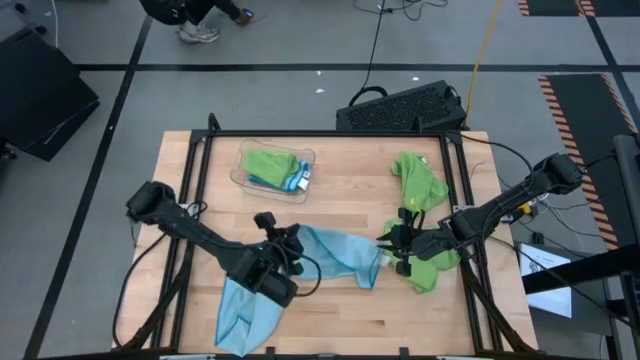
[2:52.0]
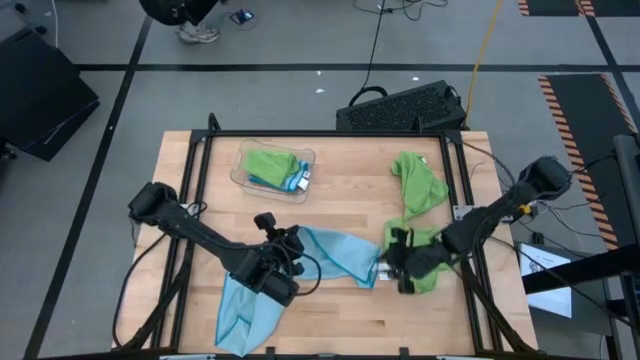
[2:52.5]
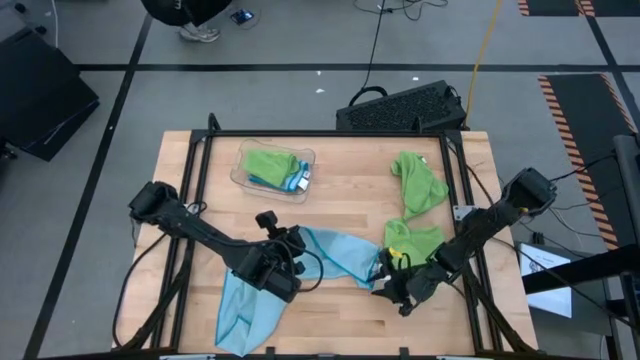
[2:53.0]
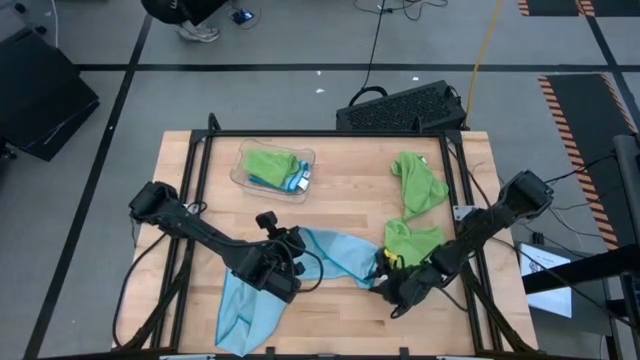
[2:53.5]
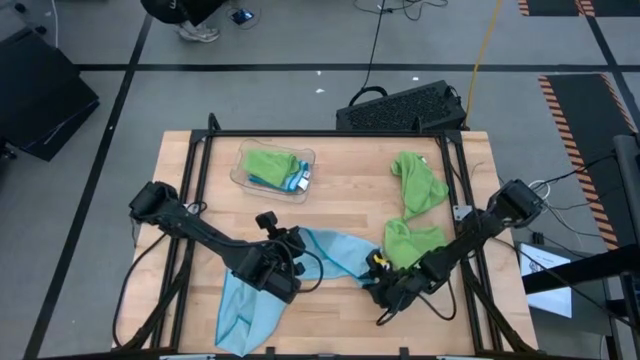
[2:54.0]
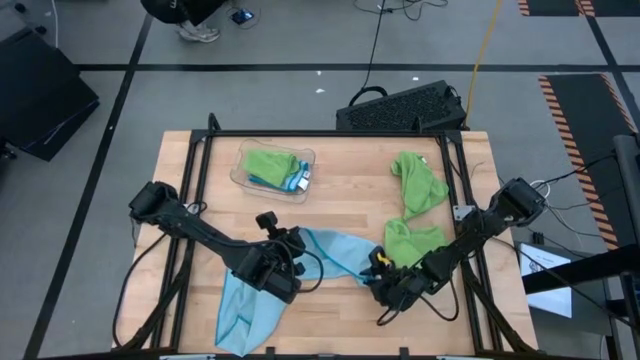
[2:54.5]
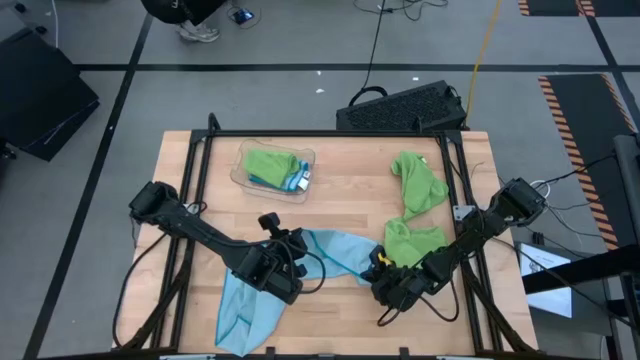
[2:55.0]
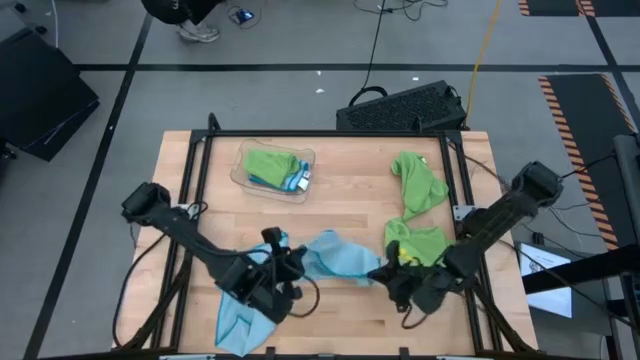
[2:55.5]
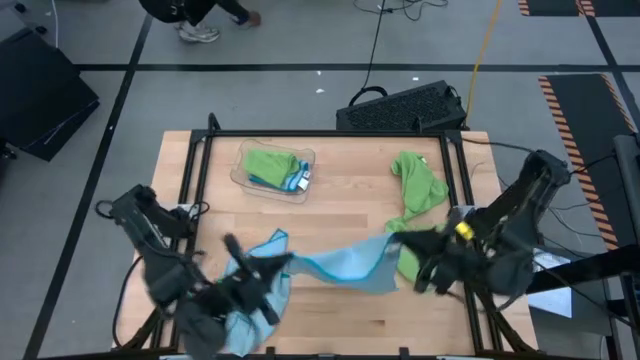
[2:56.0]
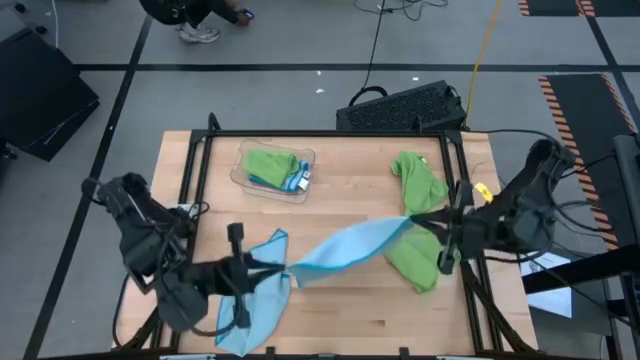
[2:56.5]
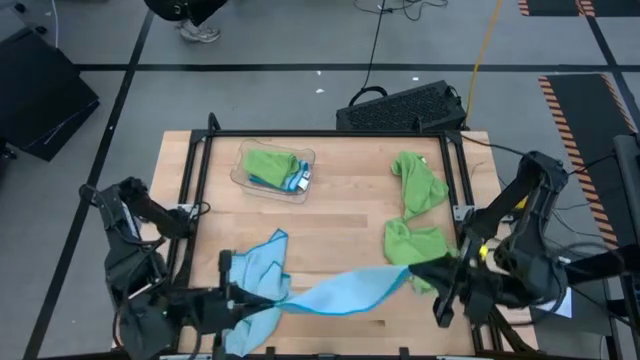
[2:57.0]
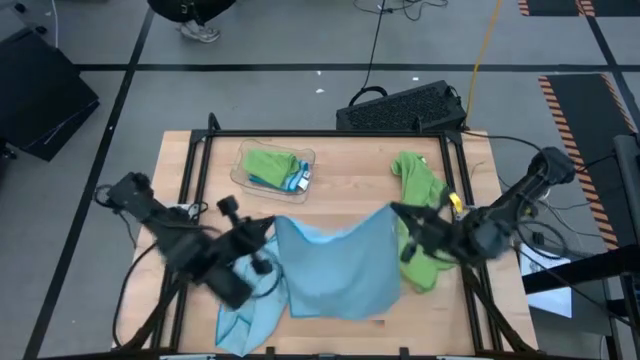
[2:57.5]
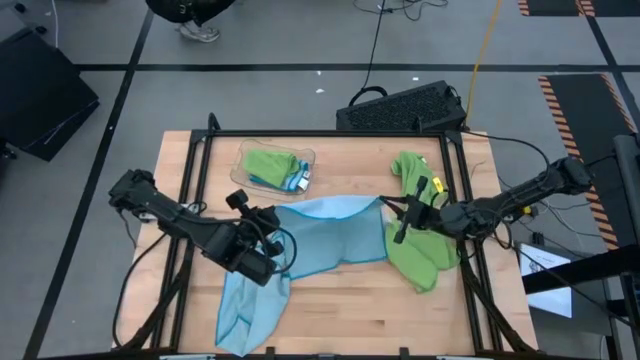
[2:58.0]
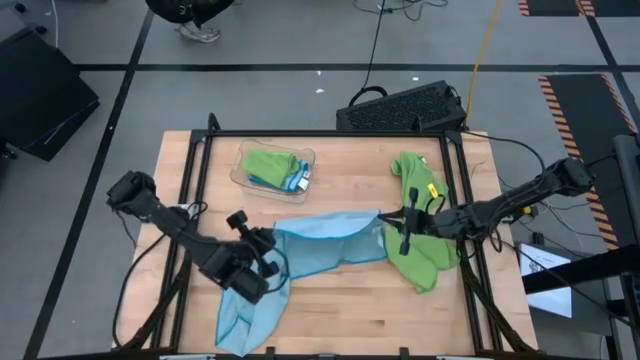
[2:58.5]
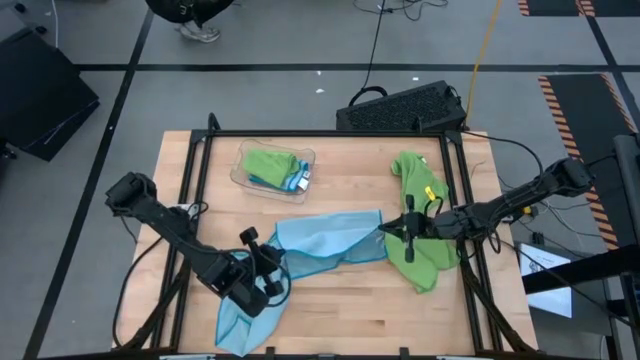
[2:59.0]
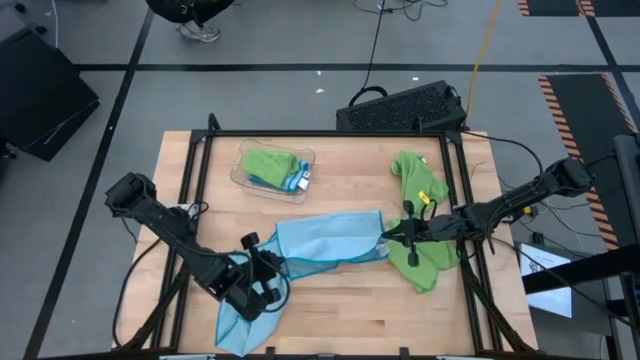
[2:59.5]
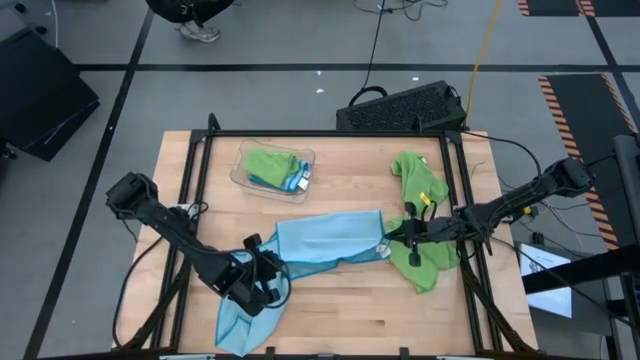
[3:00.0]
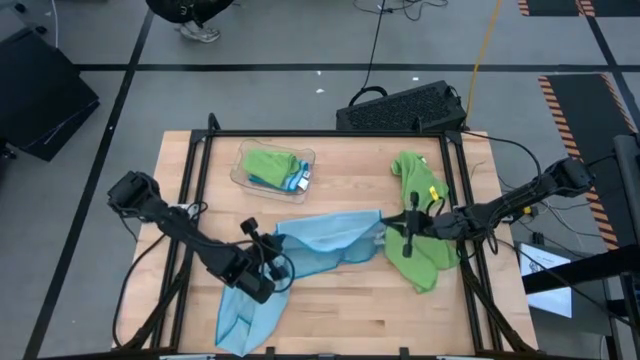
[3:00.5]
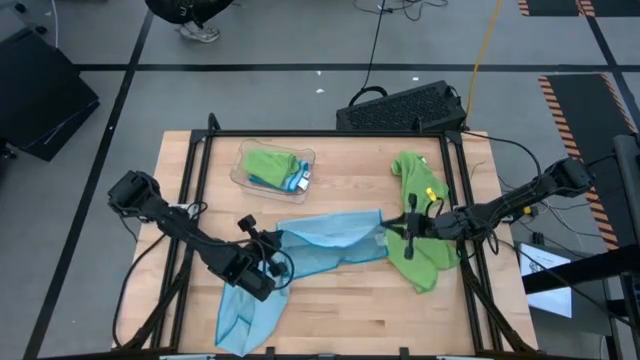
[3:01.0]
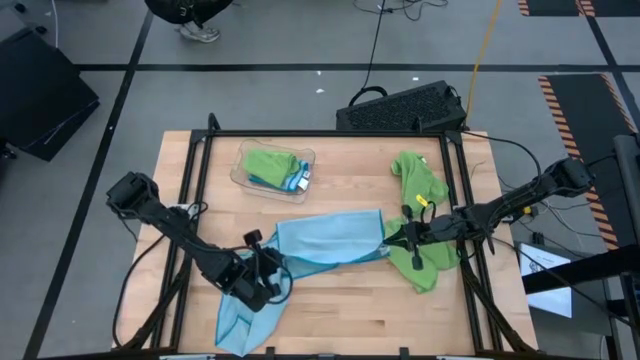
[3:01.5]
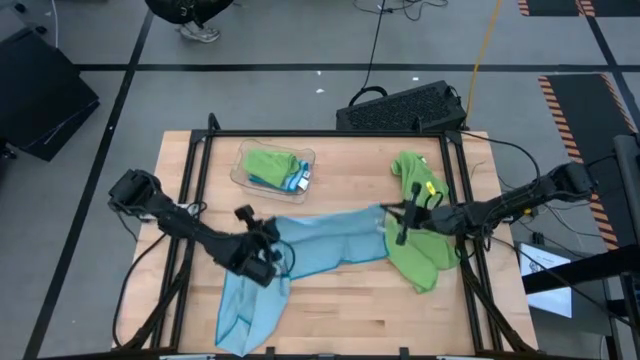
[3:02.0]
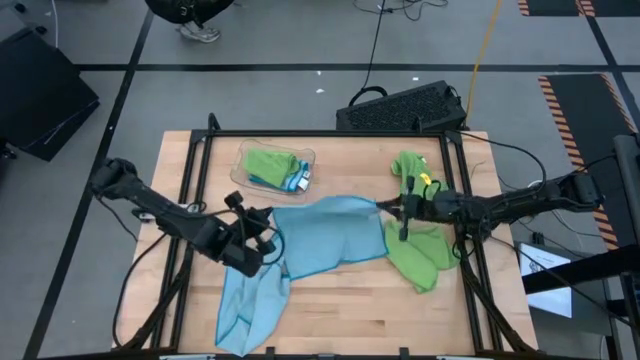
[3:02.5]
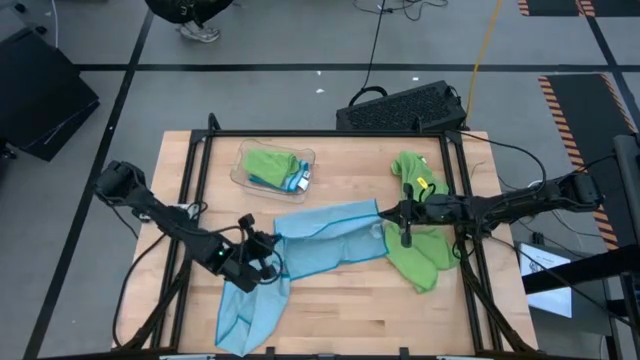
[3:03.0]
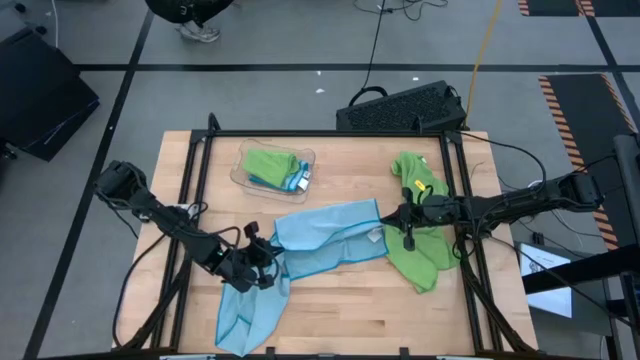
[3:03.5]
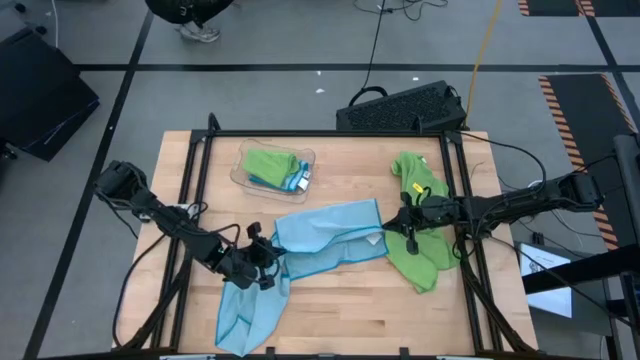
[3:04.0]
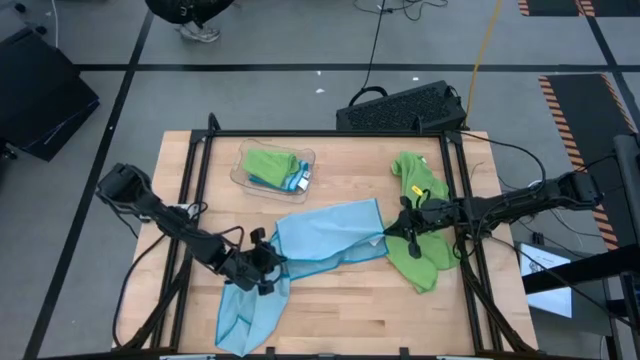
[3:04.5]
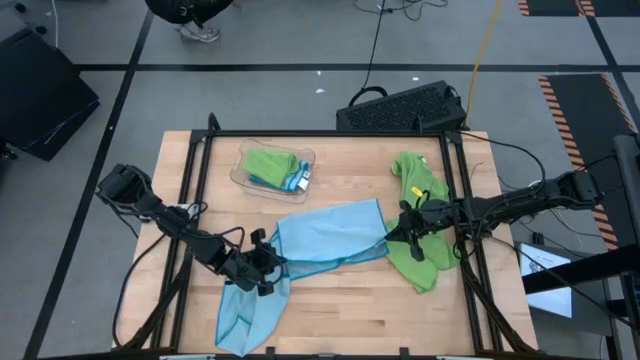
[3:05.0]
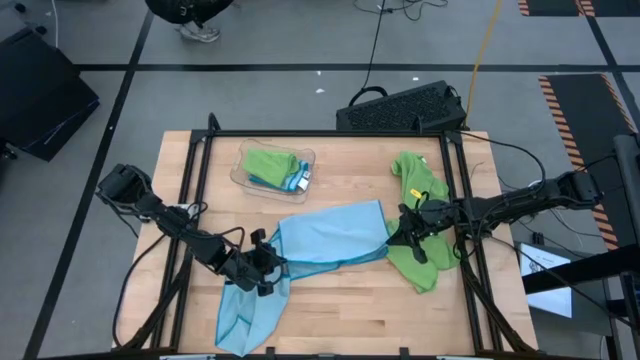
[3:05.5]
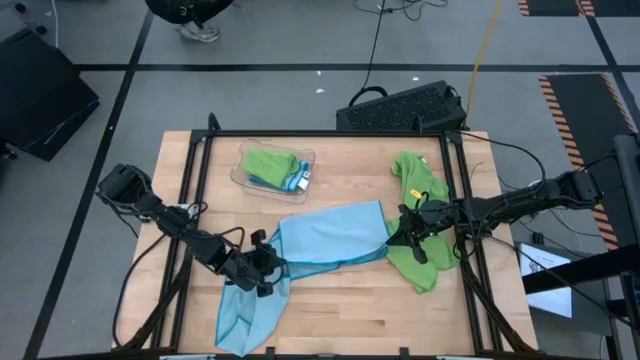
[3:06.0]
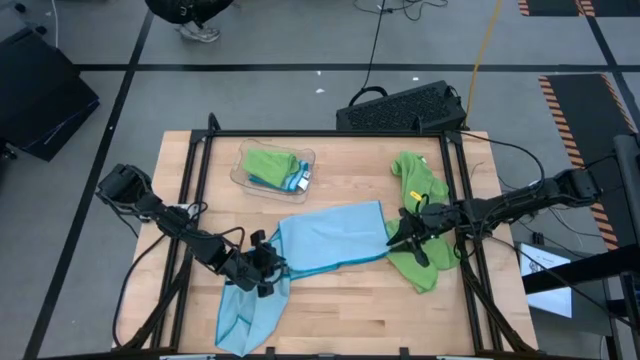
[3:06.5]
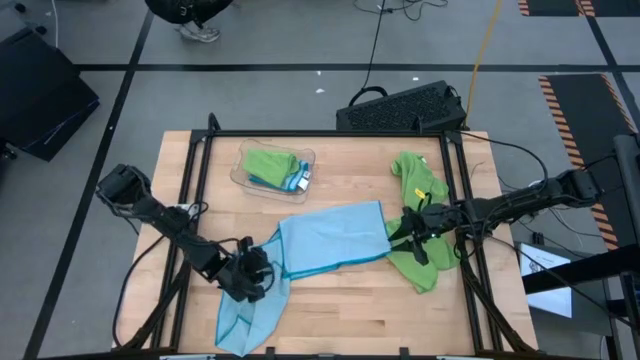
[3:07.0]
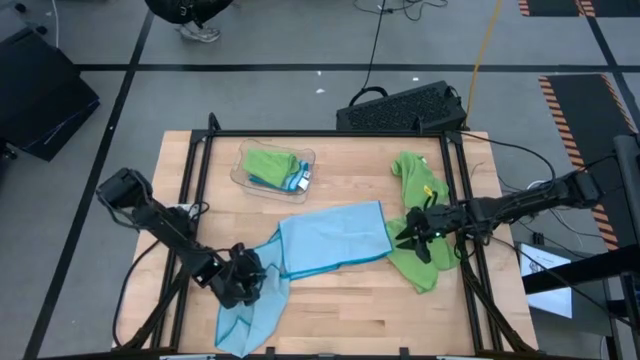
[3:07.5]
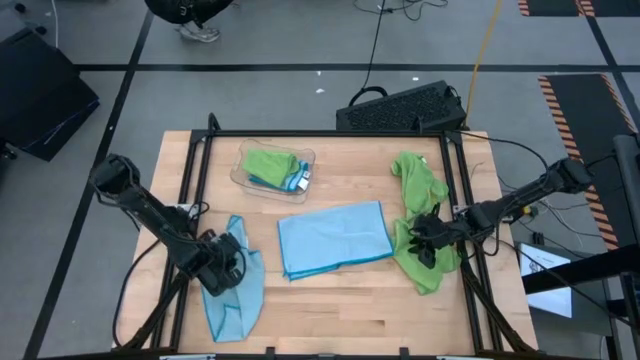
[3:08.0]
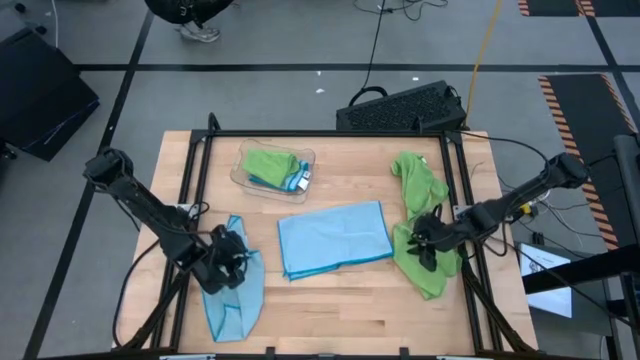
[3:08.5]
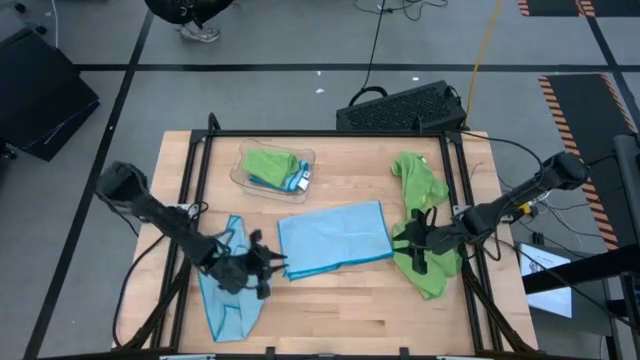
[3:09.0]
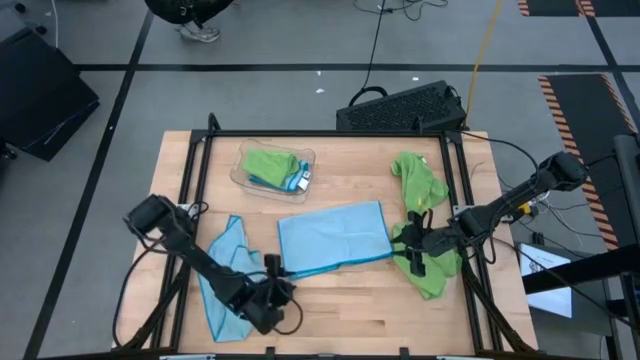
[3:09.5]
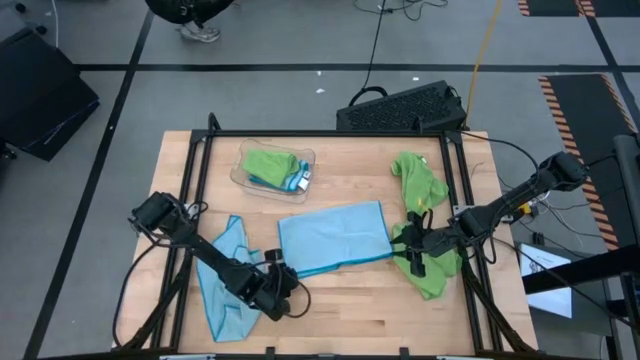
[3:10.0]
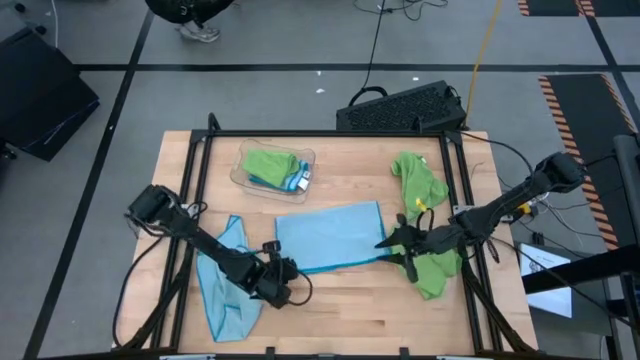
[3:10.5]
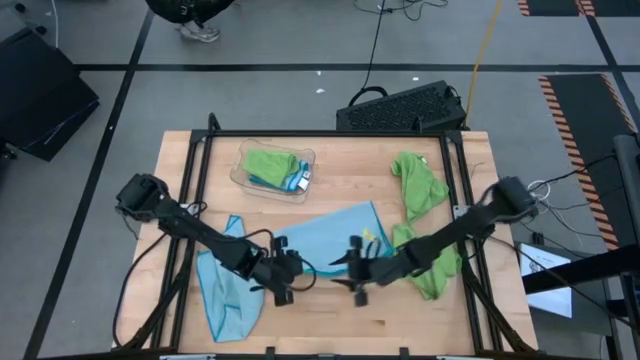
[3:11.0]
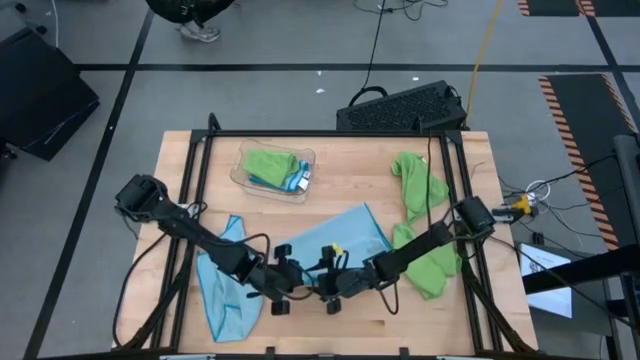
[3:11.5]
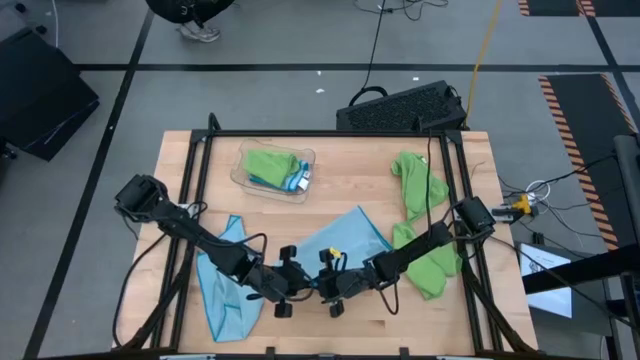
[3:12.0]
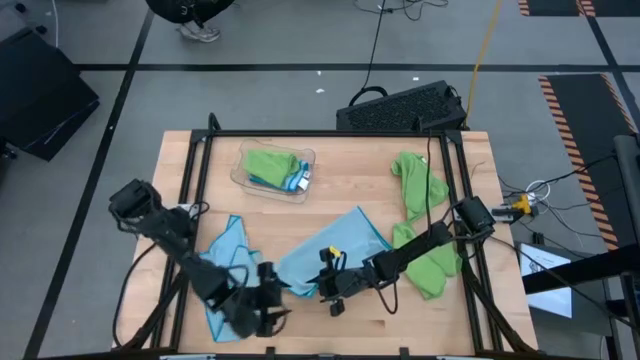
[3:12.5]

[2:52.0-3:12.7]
Task: Fold microfiber towels
Fold the right blue microfiber cloth
